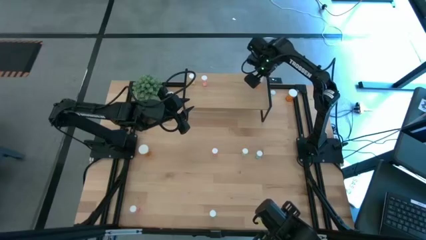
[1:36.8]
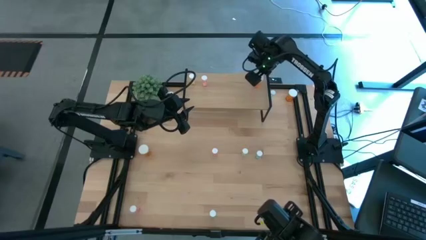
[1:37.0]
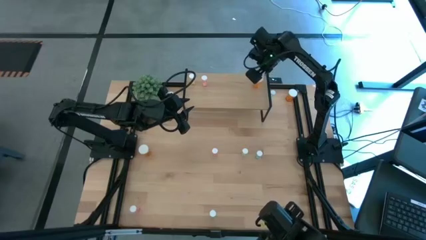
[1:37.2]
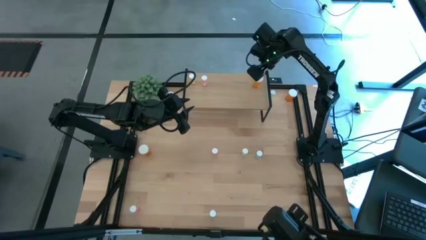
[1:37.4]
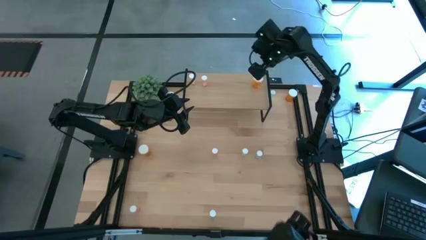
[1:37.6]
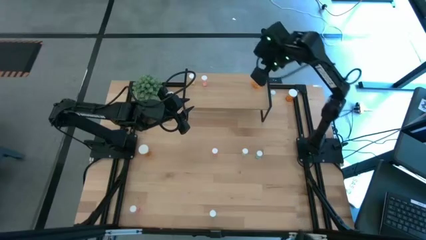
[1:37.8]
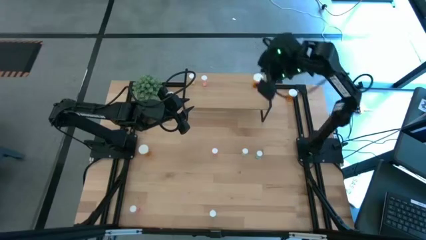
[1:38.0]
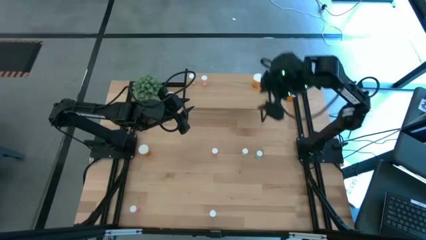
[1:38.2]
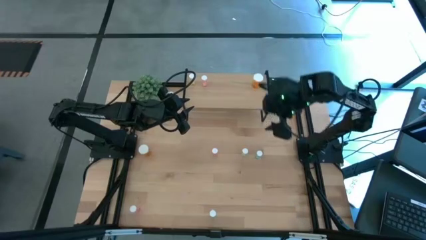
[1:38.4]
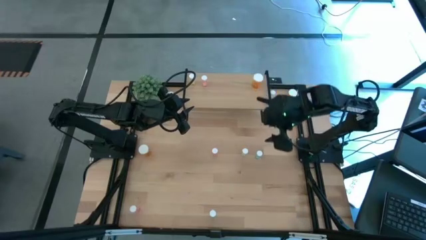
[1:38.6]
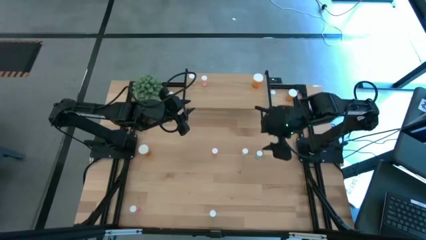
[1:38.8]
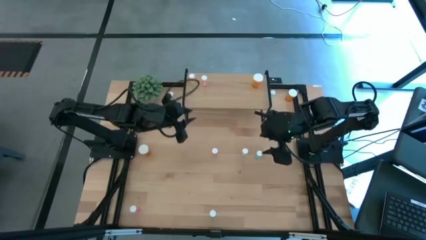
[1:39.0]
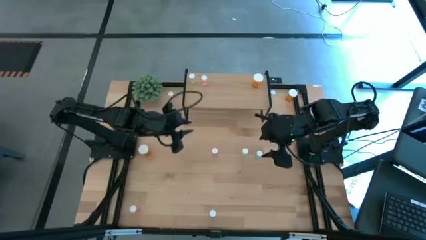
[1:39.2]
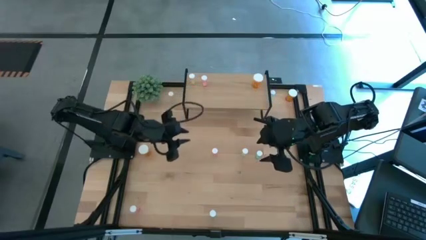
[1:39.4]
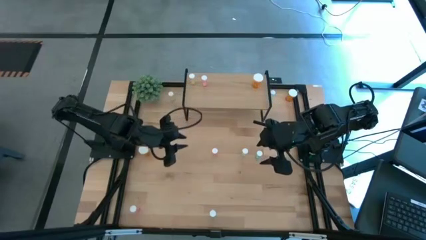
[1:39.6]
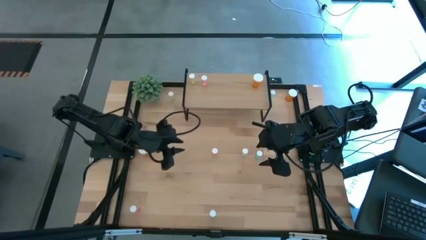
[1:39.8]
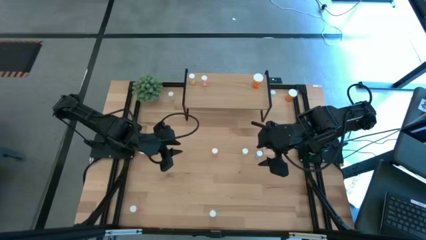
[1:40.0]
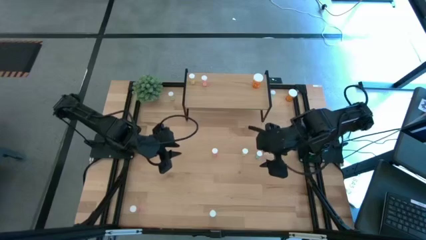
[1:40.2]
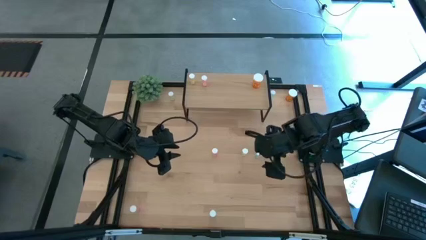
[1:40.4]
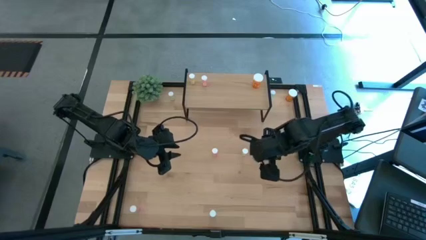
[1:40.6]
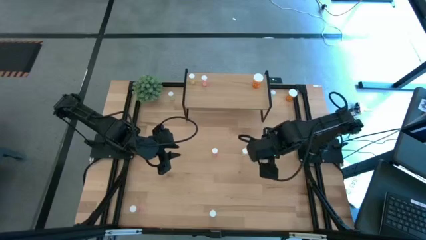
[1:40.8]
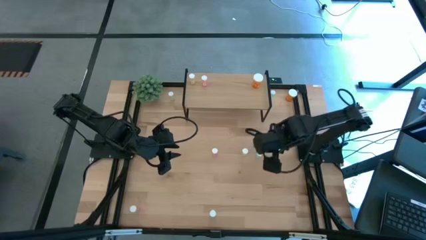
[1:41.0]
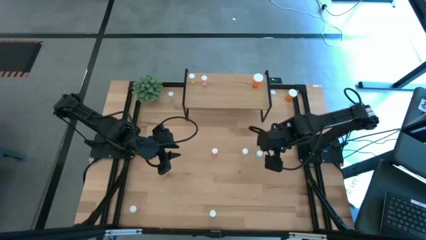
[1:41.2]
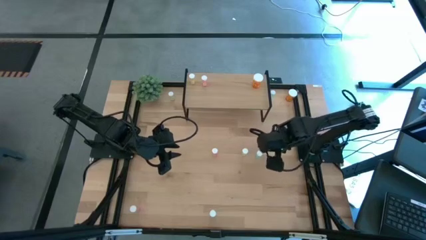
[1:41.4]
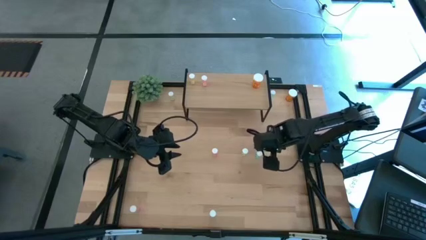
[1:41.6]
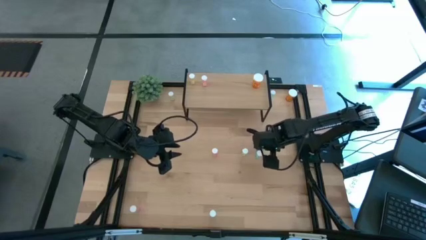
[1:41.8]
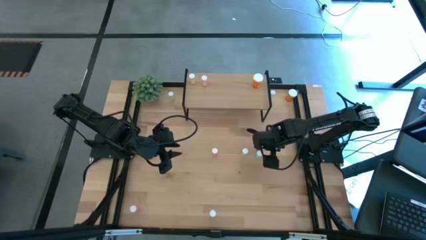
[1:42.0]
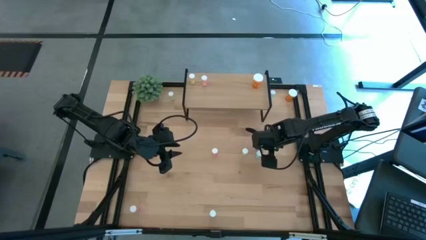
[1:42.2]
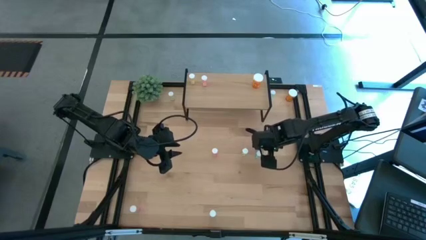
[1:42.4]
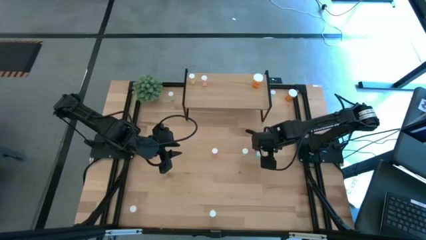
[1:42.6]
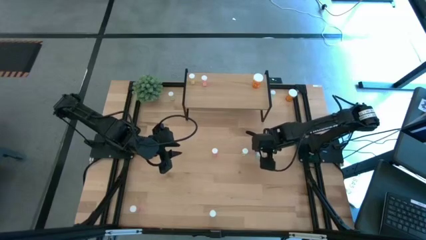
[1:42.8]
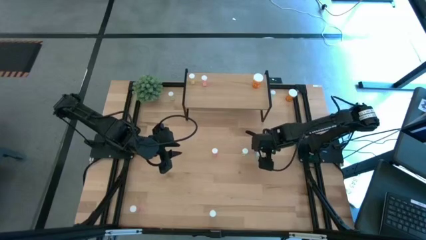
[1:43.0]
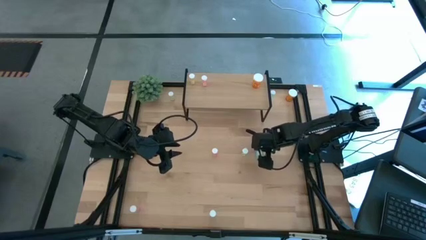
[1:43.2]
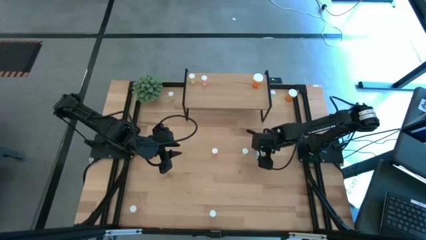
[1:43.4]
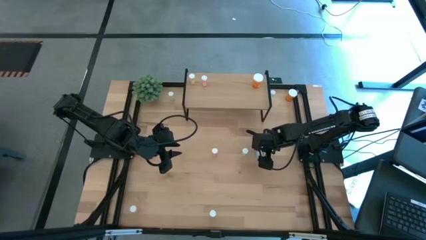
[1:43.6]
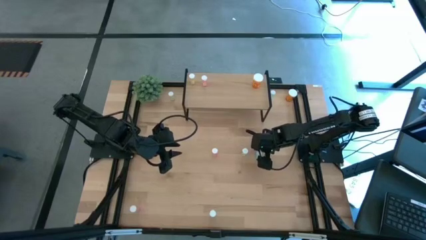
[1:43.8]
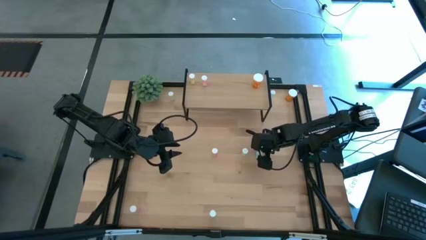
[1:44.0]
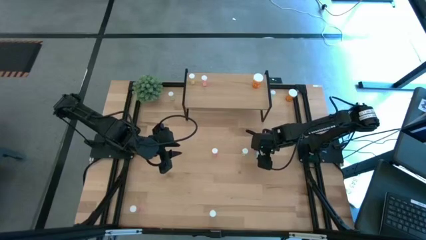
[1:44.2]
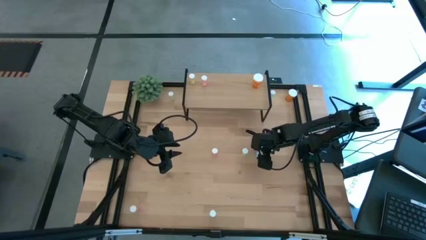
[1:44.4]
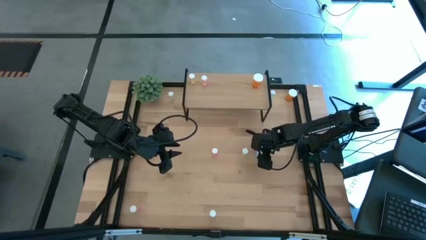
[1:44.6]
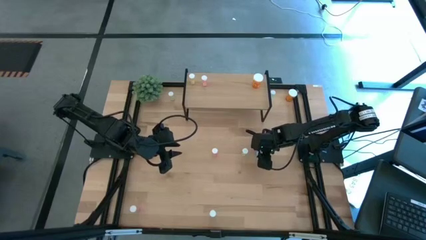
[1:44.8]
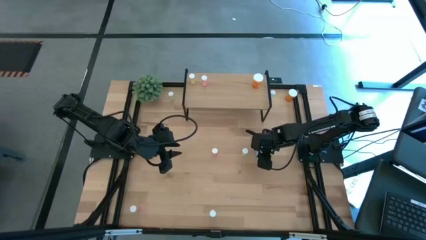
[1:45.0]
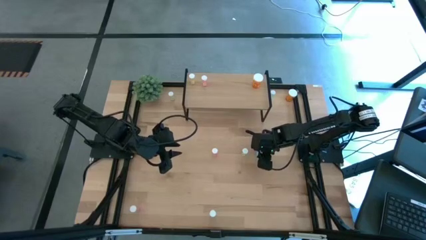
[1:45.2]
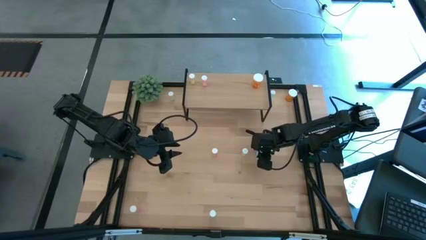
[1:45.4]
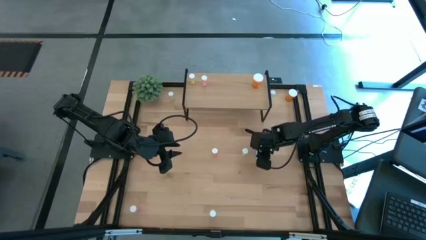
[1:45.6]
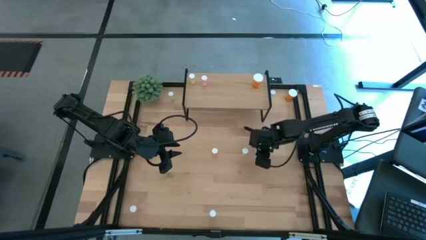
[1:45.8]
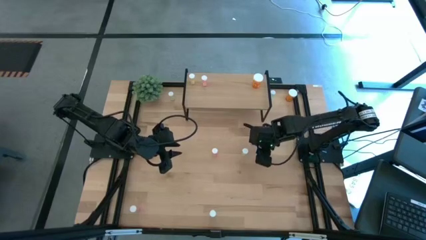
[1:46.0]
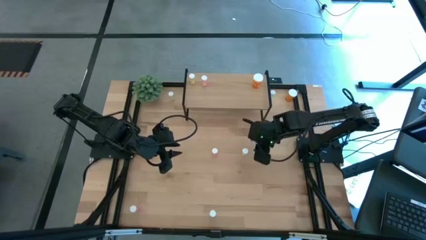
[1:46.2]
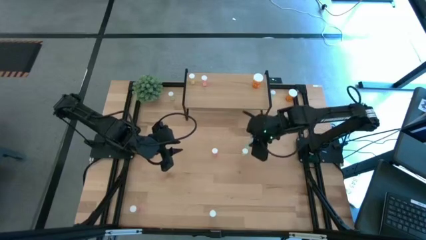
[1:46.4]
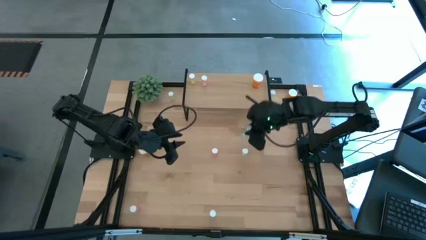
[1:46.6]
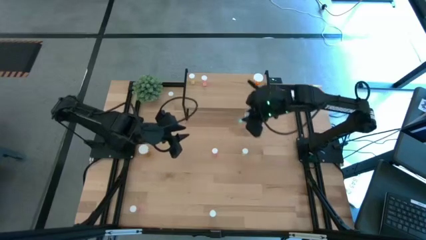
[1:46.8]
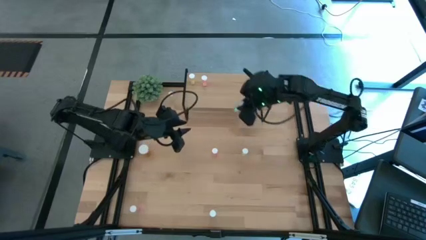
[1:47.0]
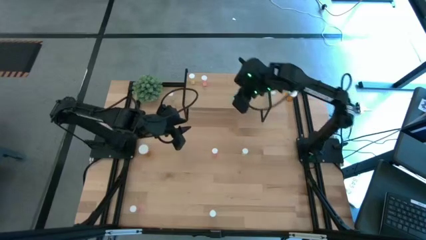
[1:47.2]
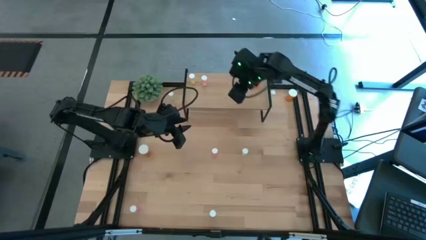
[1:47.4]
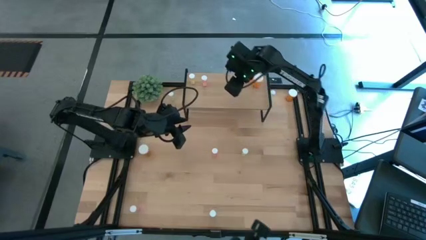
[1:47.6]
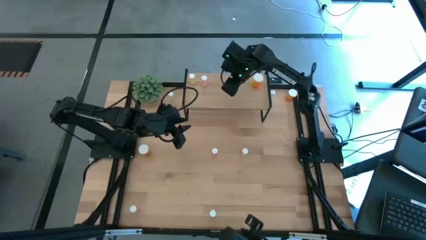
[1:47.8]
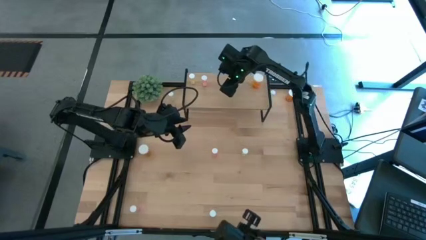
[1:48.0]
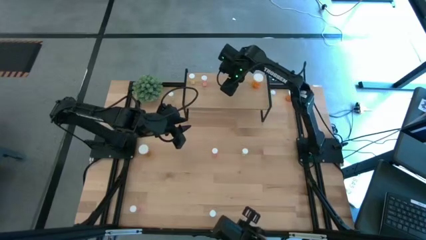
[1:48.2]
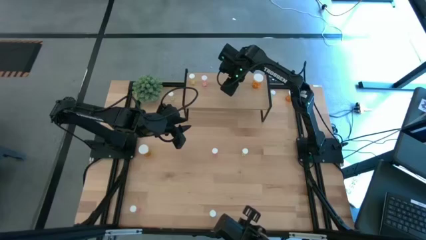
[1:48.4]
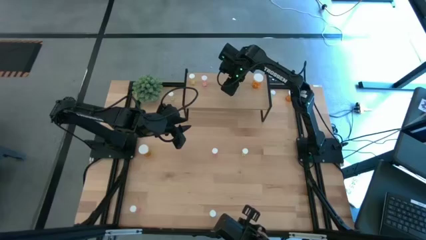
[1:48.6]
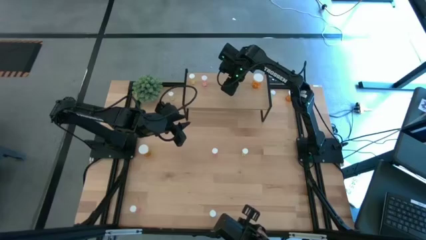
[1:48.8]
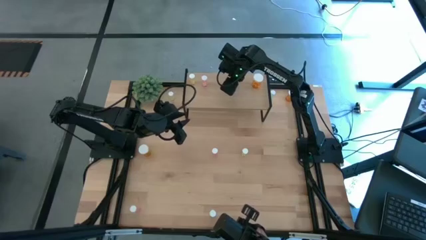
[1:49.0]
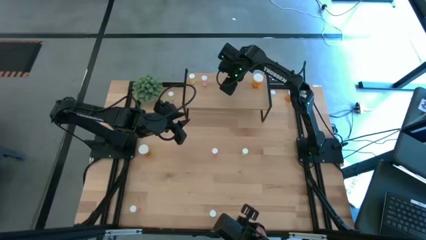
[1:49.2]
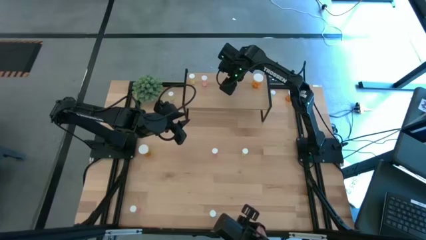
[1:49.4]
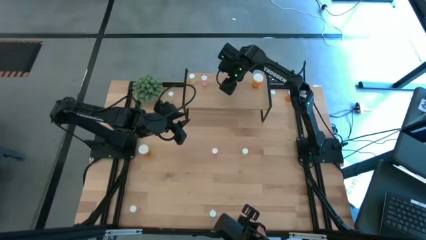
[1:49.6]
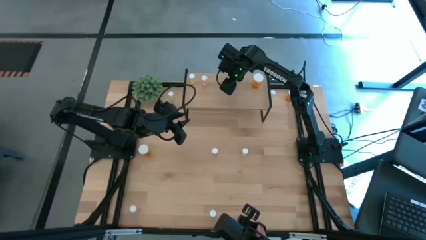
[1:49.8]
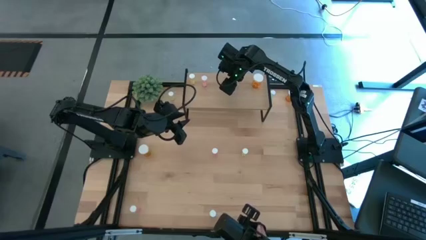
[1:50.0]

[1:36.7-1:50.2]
Task: Pick and place medicine bottles onto shelf by color
Put the middle blue pill bottle on the shelf

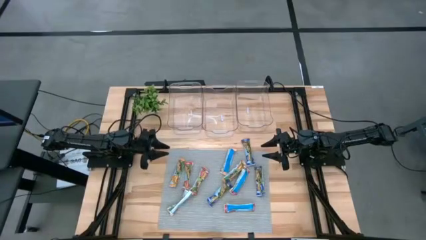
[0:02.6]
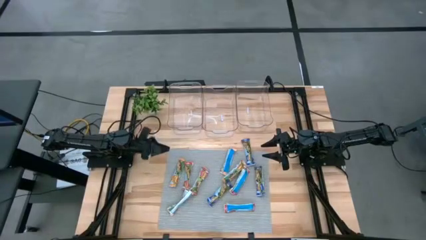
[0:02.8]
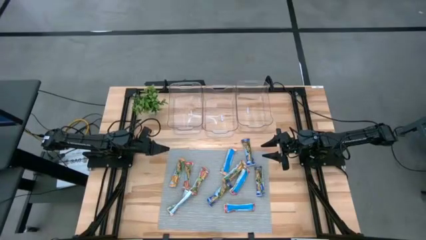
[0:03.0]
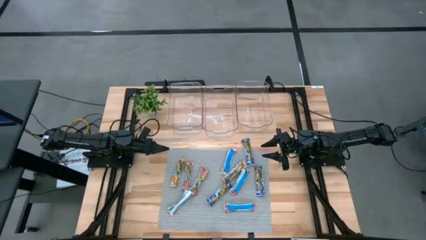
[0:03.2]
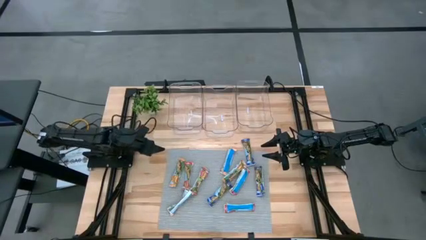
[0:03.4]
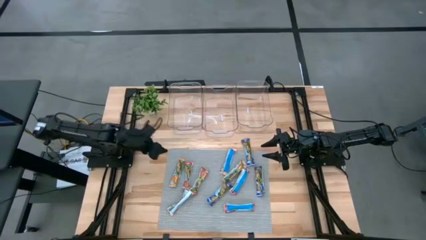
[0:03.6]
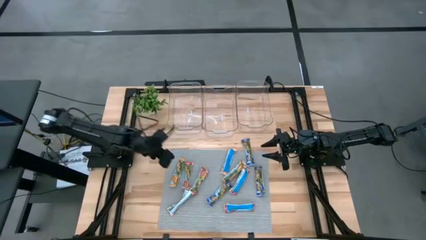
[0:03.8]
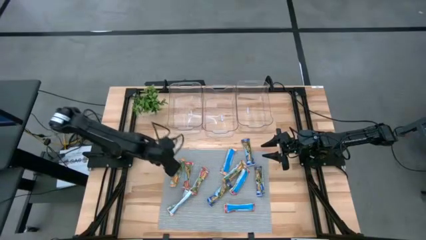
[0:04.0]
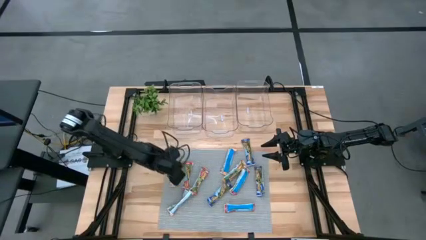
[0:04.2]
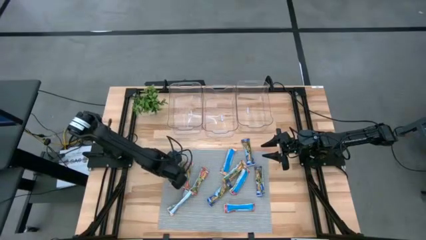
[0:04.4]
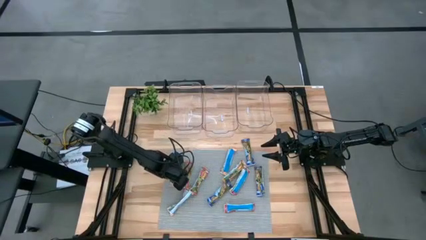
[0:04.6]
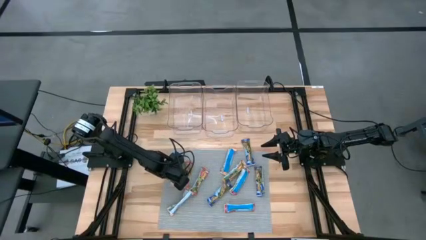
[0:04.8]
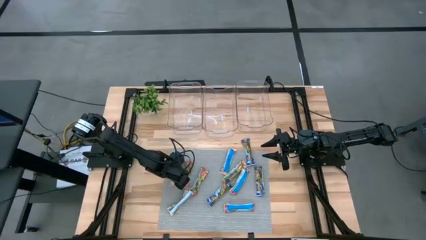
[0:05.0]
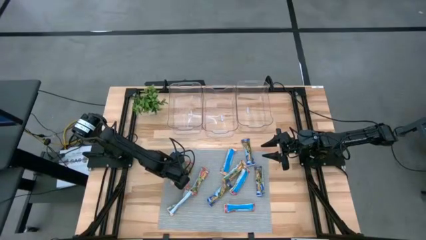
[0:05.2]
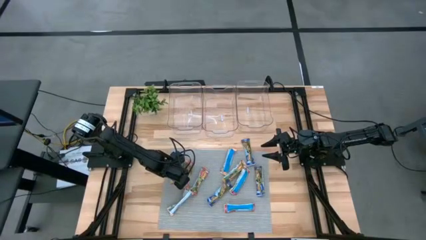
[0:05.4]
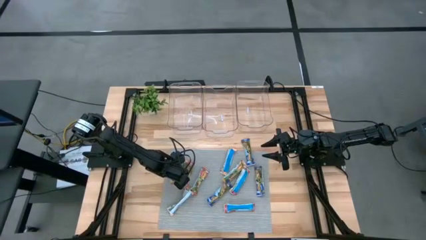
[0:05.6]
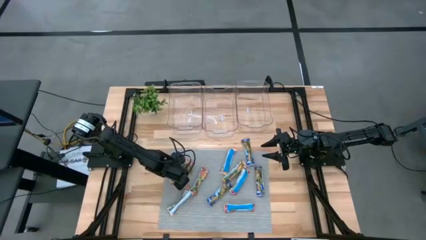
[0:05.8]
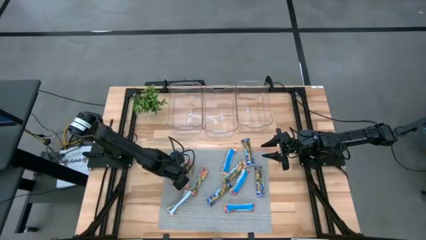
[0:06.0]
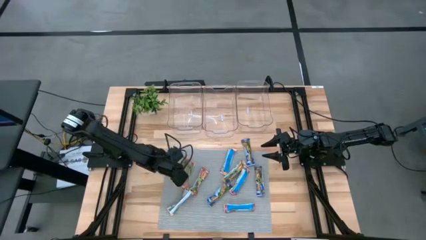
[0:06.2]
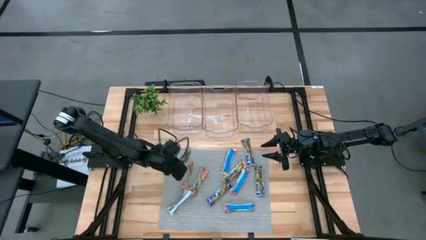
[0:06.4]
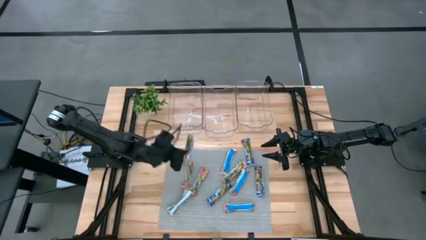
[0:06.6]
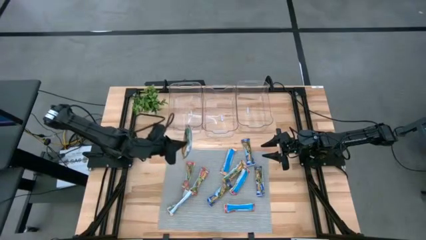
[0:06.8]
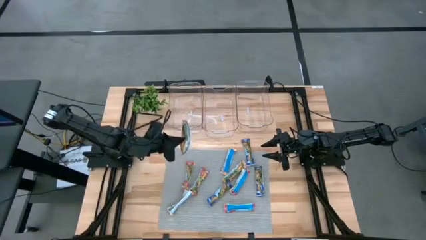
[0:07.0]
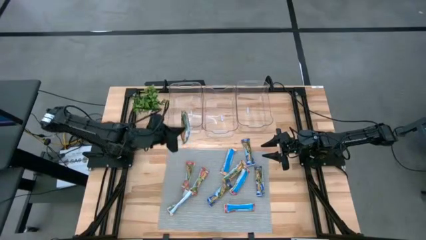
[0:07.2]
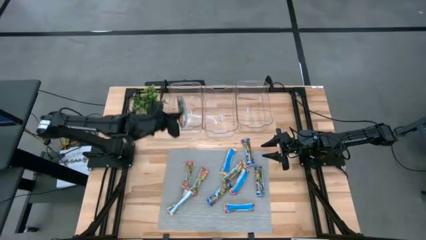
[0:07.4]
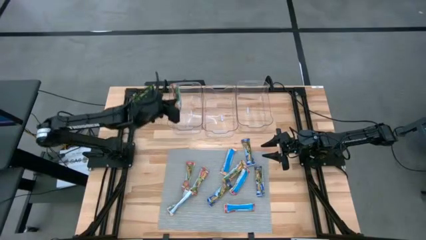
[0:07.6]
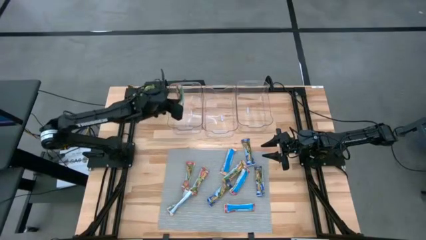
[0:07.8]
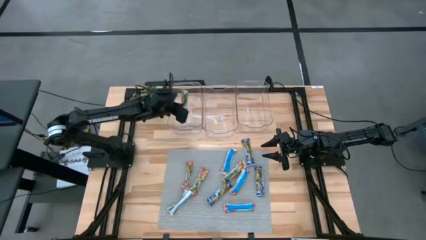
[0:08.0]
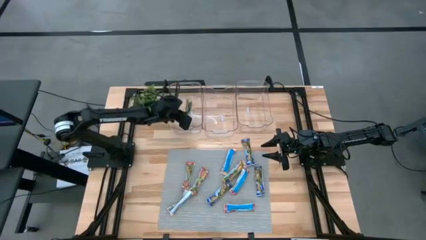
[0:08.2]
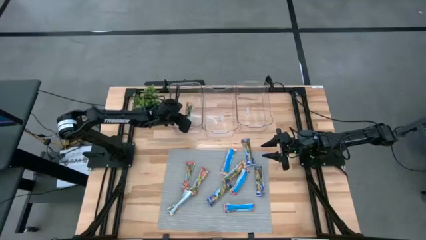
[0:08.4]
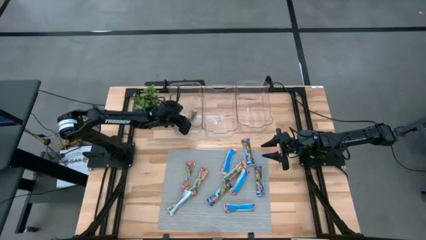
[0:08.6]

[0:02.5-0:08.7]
Task: Pick and place Granola Bars by type
Put the orange granola bar into the left transparent bin
